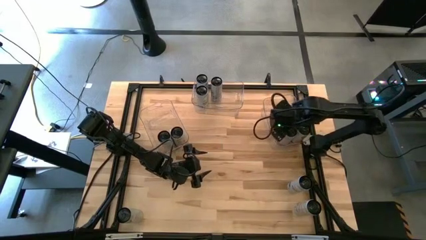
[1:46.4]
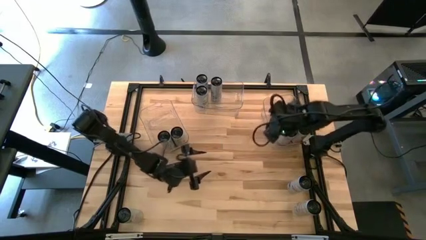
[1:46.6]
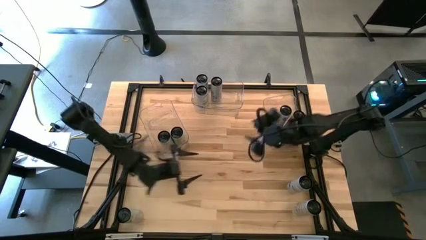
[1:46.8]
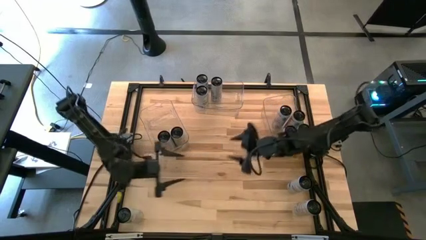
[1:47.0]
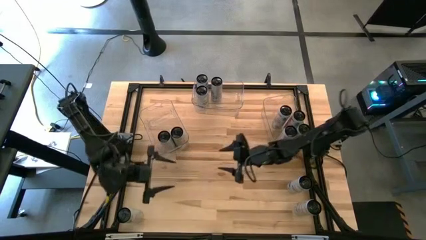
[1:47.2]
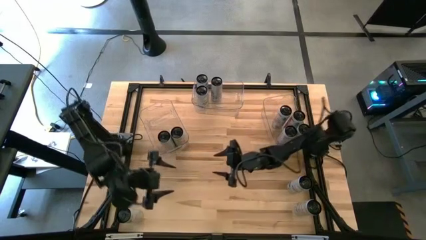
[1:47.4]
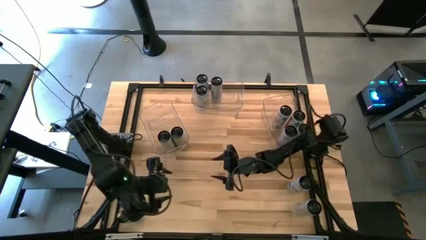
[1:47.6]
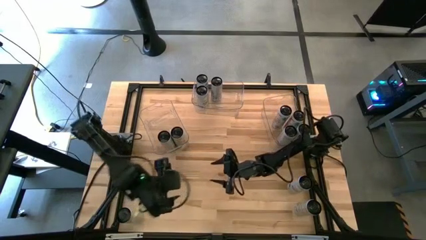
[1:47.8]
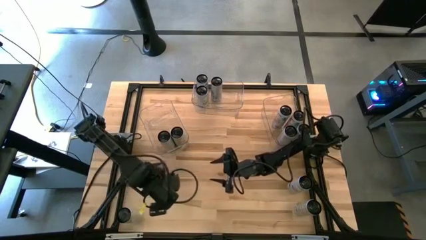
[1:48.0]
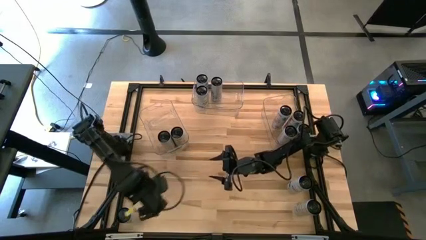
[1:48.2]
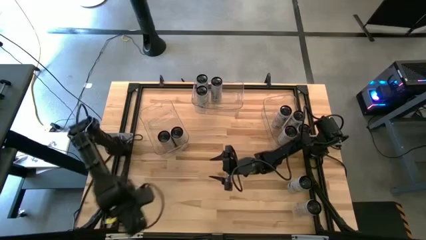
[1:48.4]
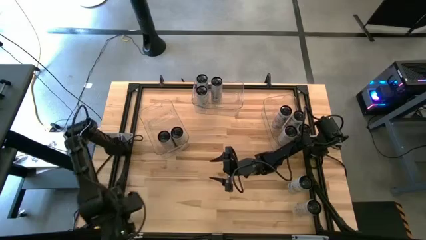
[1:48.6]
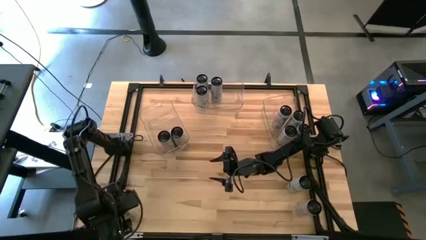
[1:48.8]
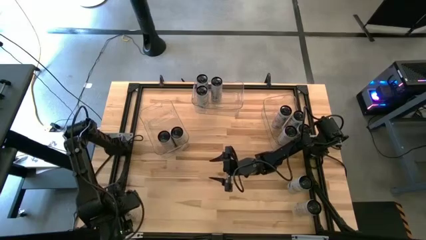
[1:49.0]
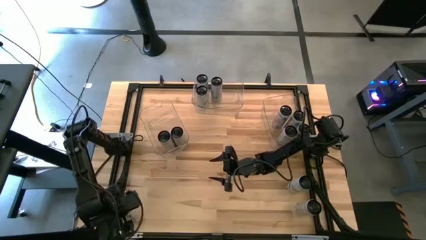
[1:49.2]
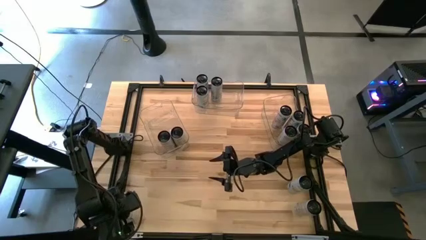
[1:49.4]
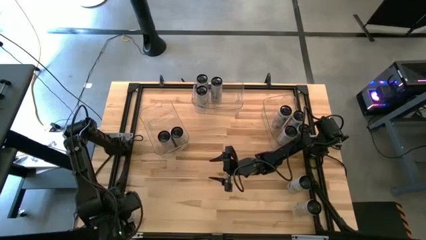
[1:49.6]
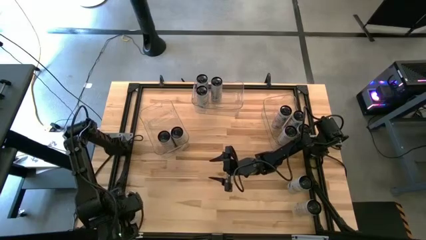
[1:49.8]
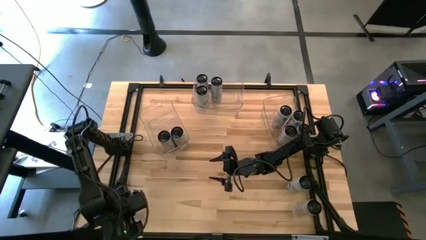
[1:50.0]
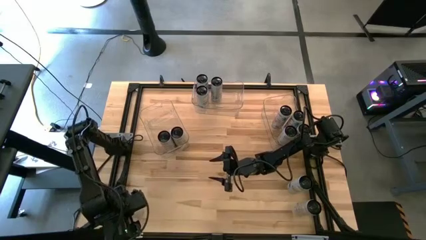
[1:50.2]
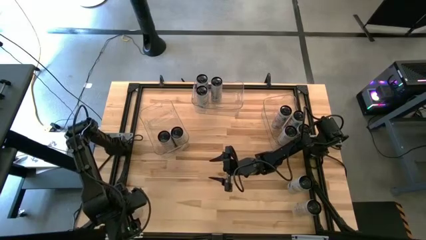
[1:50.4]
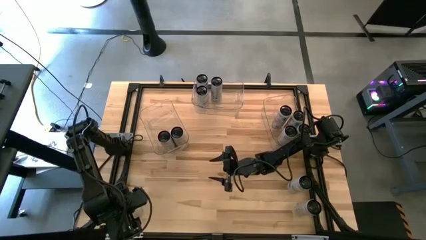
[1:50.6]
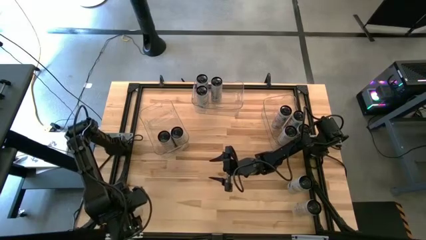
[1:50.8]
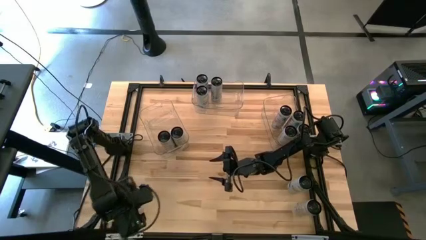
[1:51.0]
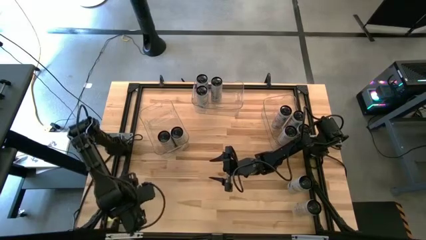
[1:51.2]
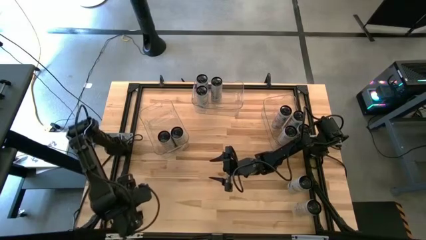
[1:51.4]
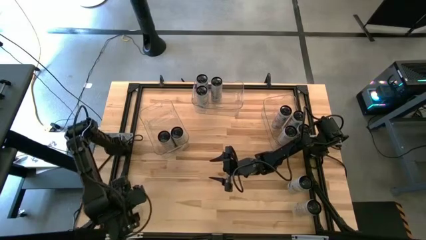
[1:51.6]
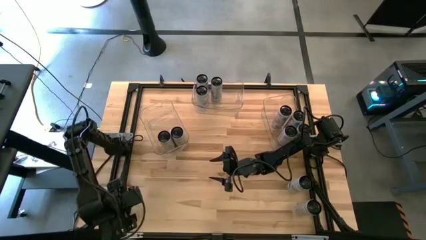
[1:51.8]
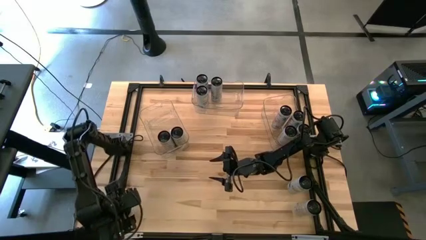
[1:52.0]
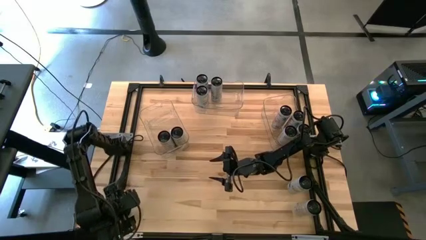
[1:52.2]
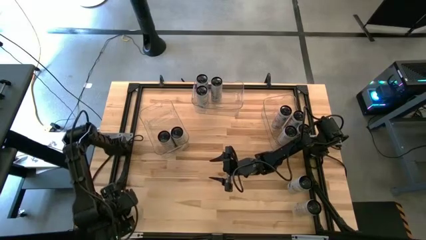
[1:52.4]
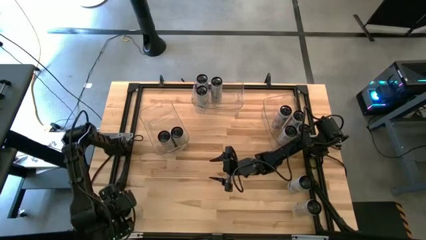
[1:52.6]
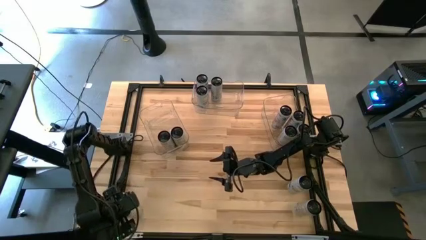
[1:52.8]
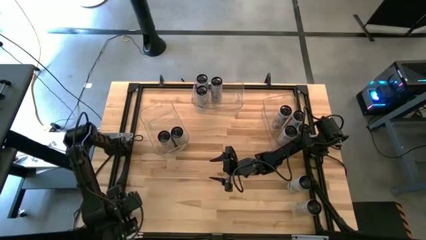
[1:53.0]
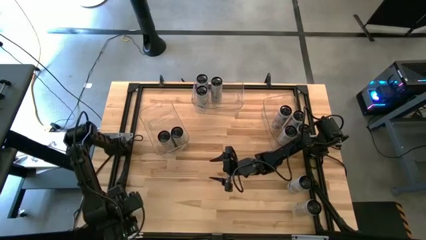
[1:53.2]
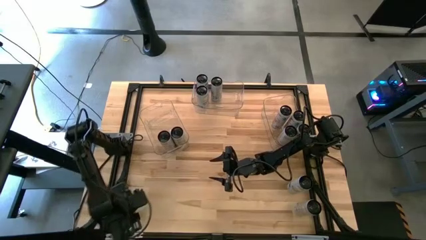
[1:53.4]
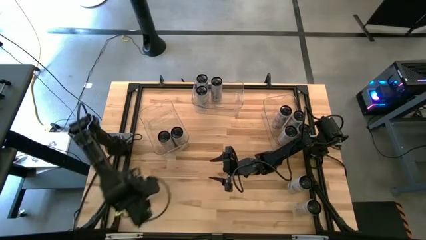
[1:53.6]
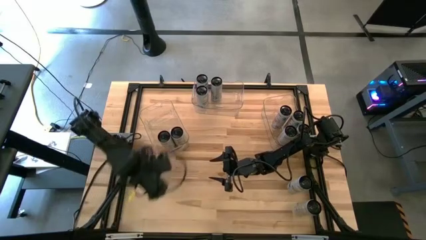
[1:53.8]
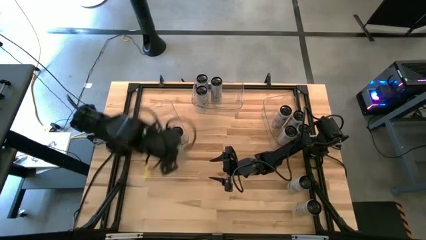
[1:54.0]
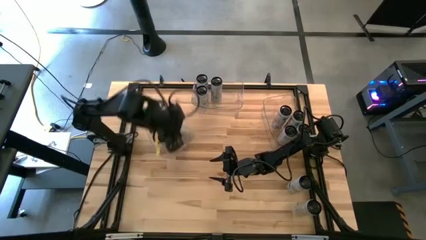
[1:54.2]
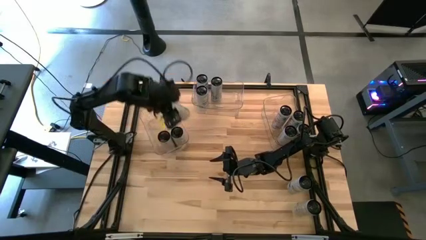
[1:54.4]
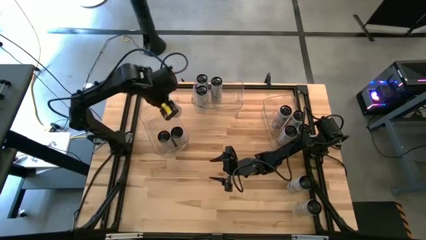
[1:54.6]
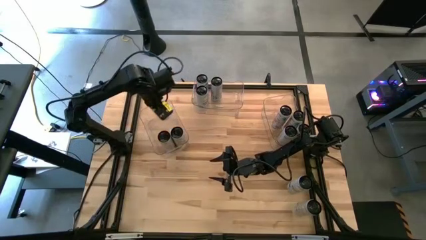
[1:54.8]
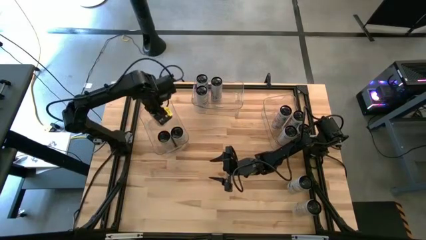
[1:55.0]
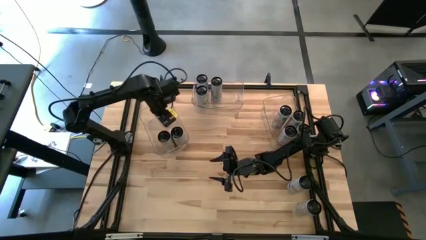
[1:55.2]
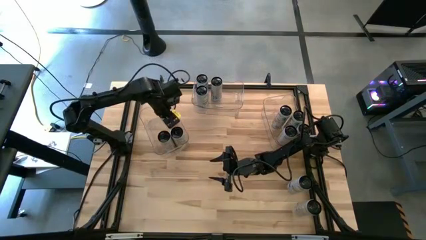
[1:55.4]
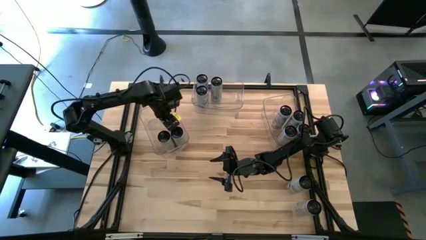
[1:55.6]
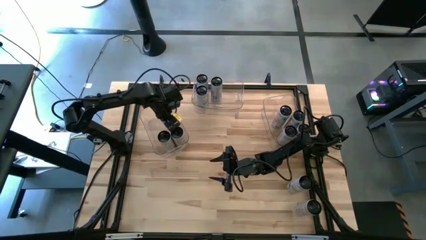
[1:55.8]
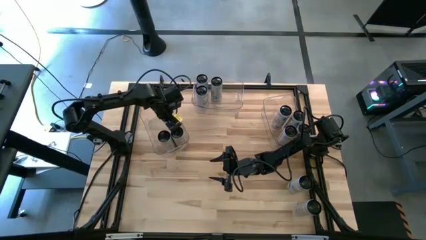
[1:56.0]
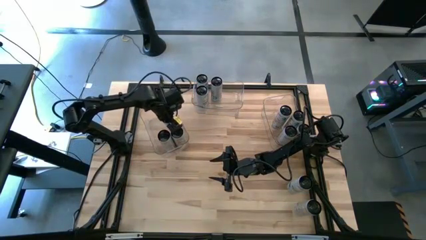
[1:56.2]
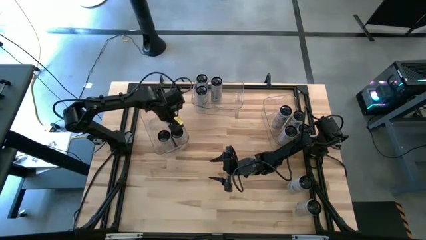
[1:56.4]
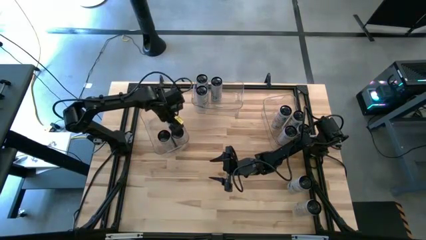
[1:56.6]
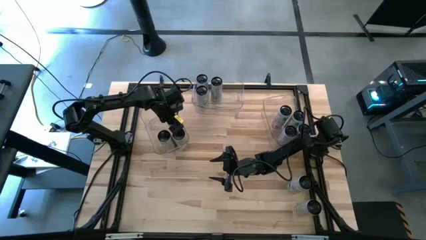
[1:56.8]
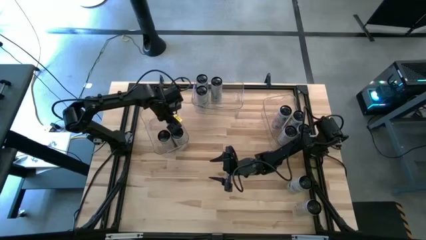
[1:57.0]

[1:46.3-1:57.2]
Task: Sort soda cans
Put the white/yellow soda can into the left transparent bin

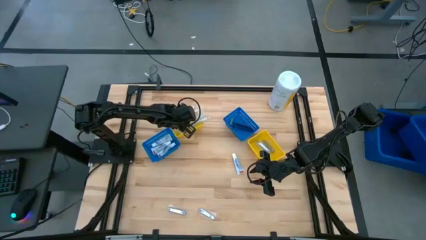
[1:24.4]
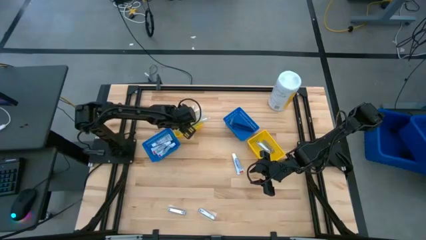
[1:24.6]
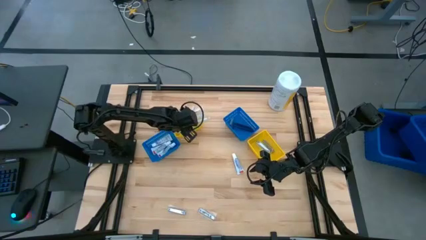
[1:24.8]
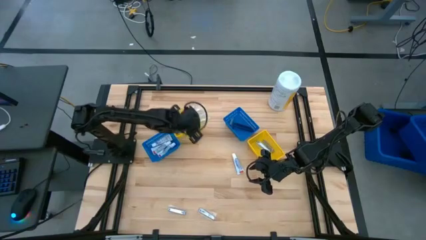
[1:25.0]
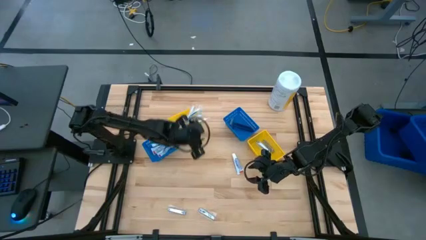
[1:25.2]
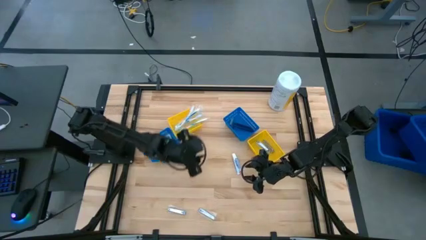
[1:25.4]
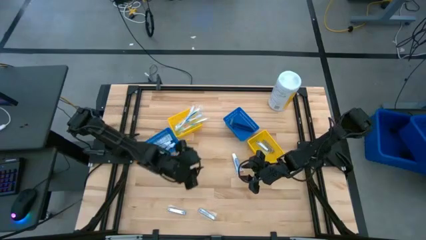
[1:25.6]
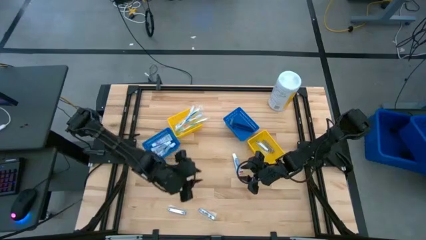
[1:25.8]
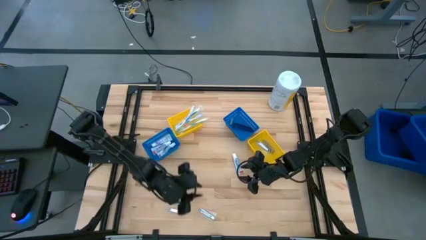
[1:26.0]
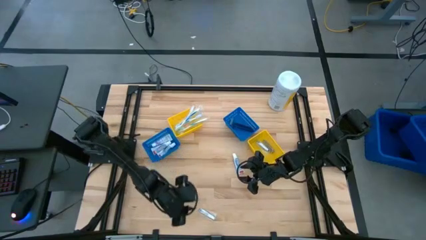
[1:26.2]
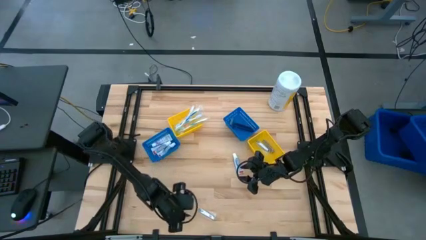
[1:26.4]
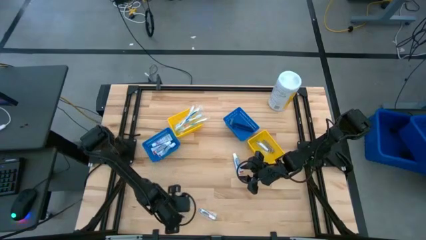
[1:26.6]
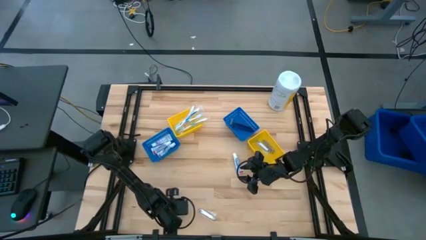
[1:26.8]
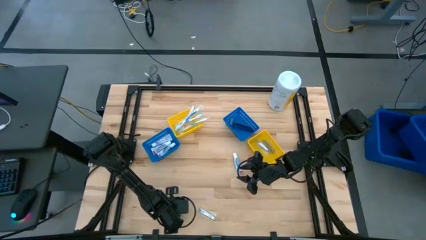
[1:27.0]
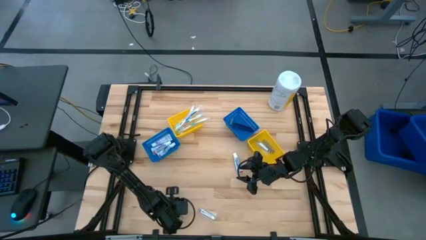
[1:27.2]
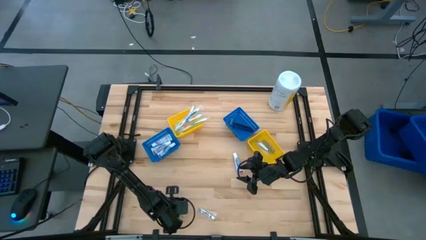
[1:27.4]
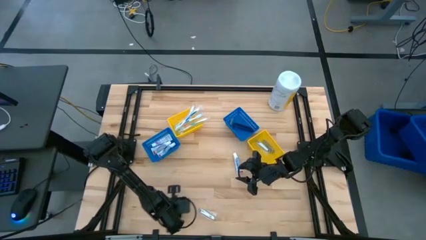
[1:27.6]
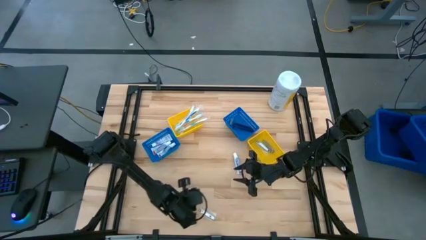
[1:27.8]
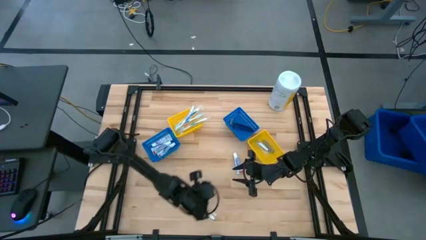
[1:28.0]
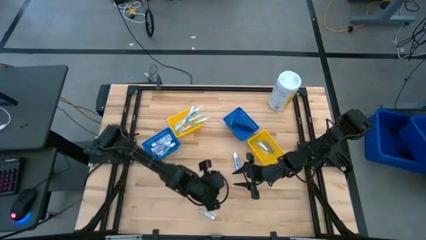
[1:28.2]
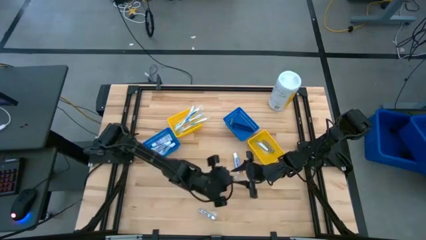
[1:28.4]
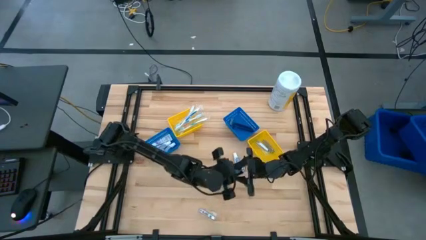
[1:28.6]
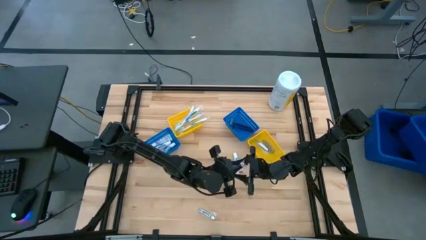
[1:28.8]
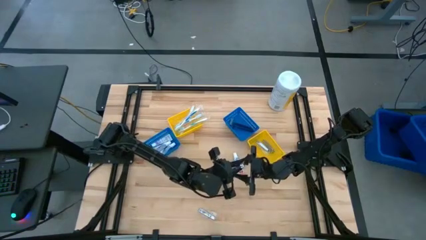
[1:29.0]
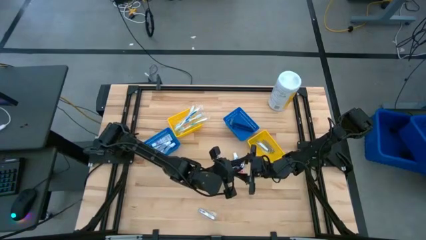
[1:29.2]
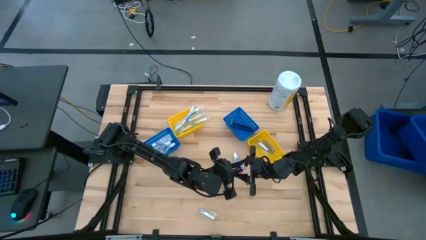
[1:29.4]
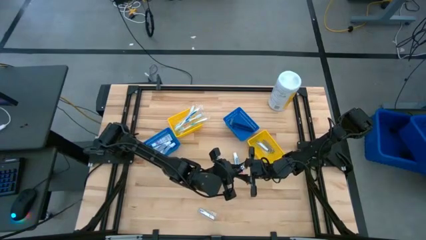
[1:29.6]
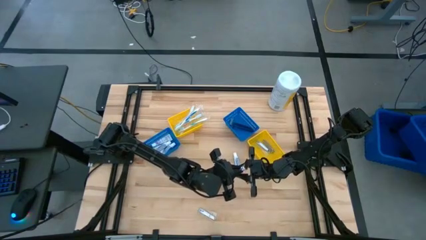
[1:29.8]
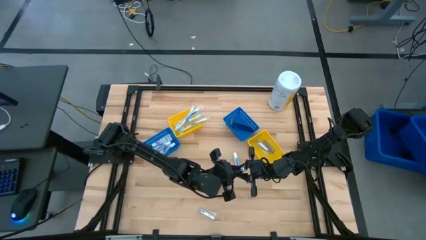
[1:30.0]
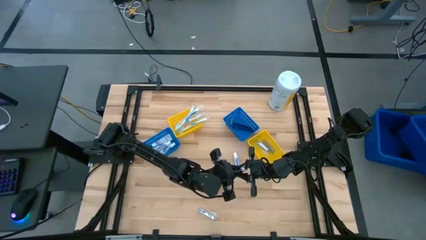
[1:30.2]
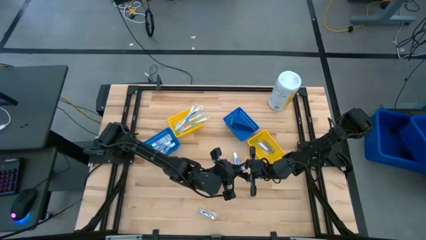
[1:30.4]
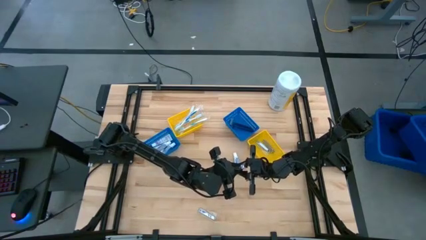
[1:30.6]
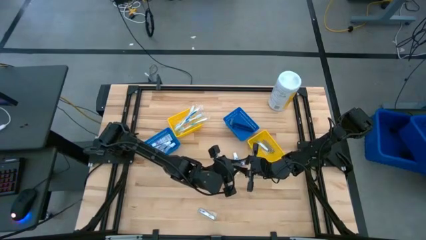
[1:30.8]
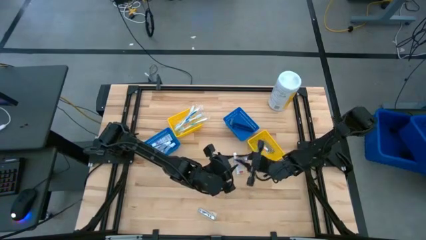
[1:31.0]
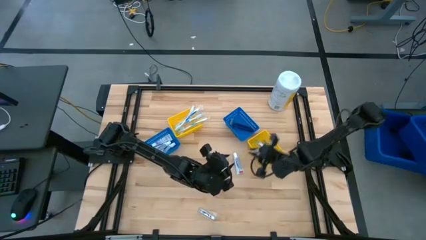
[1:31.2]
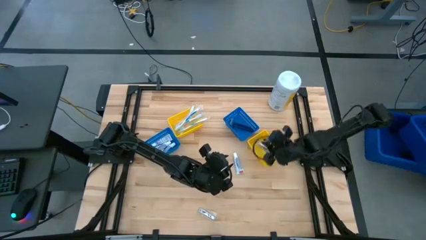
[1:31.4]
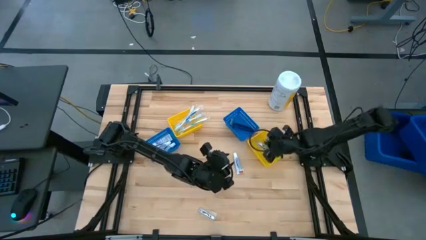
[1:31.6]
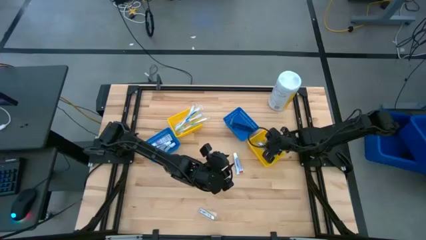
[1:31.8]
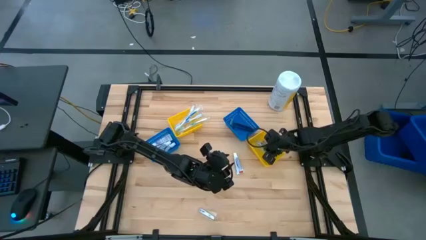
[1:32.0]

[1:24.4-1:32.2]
Task: Pick & Place Travel size toiletries
Put the nail cutter into the right yellow bin
